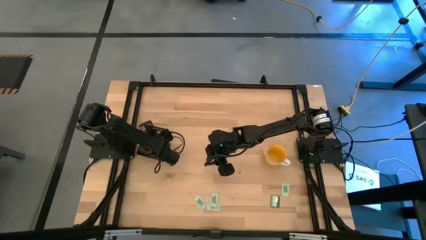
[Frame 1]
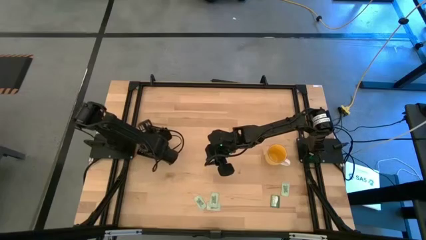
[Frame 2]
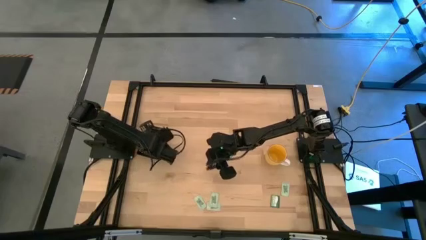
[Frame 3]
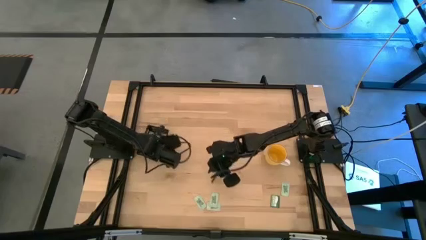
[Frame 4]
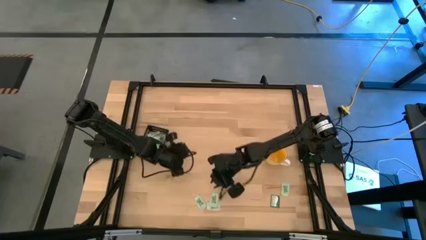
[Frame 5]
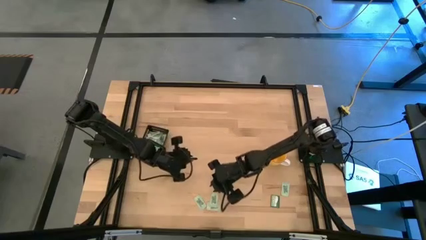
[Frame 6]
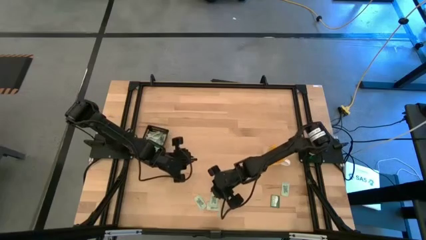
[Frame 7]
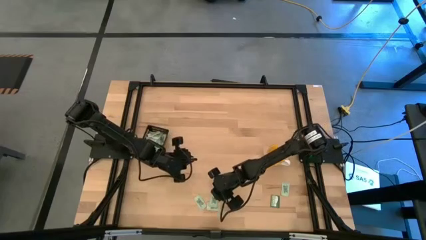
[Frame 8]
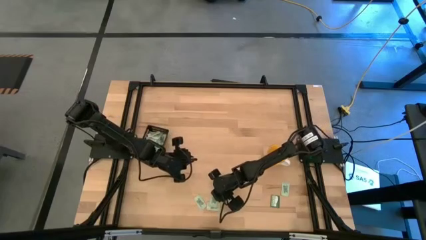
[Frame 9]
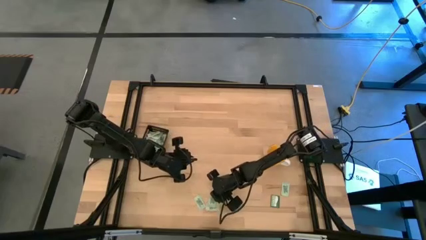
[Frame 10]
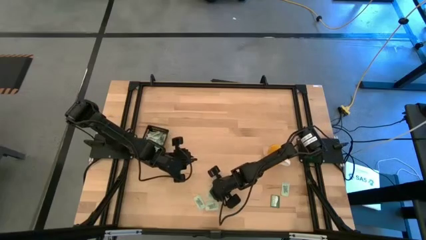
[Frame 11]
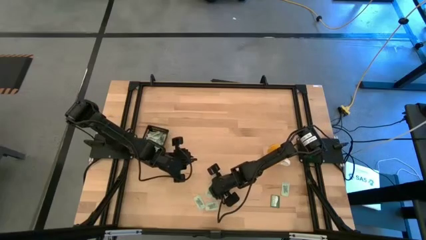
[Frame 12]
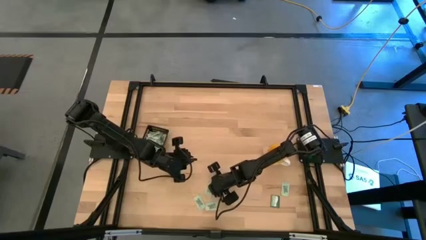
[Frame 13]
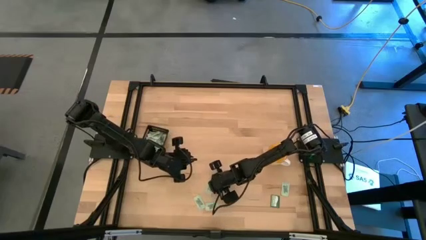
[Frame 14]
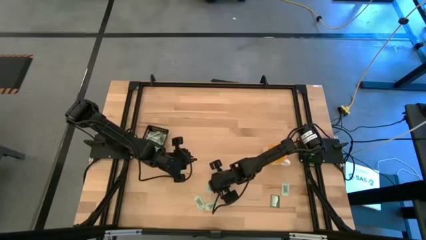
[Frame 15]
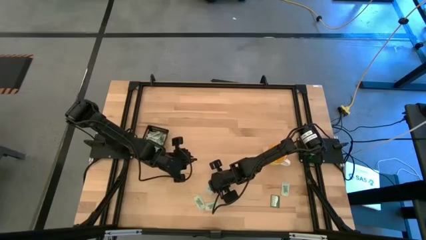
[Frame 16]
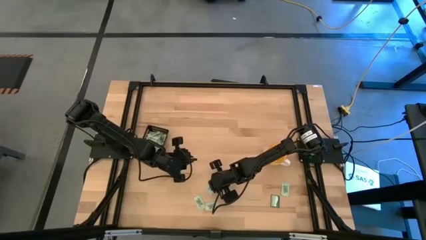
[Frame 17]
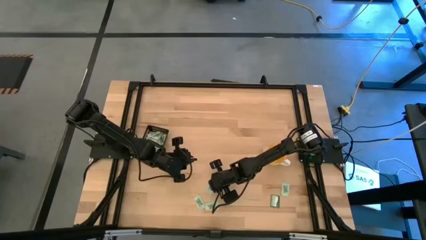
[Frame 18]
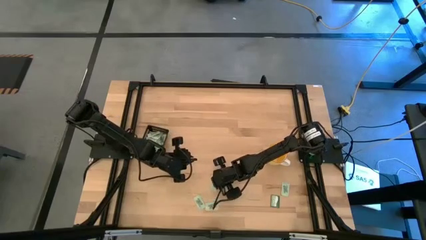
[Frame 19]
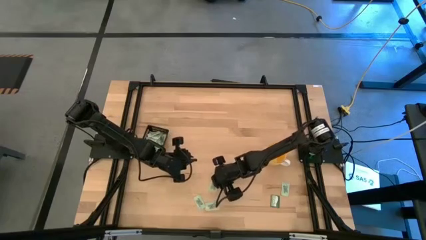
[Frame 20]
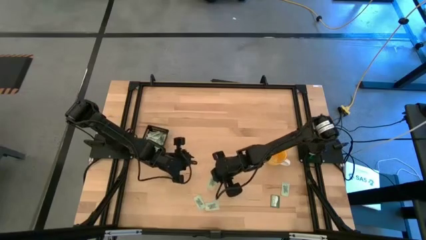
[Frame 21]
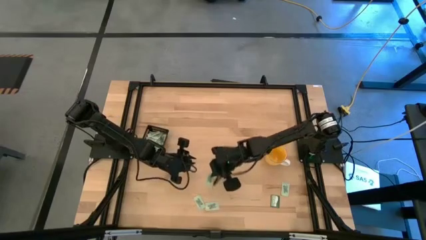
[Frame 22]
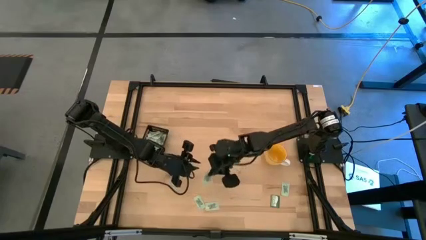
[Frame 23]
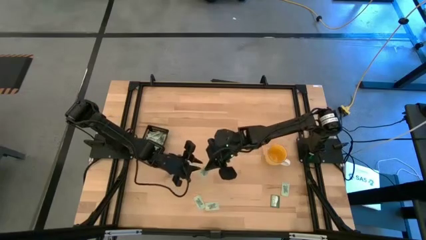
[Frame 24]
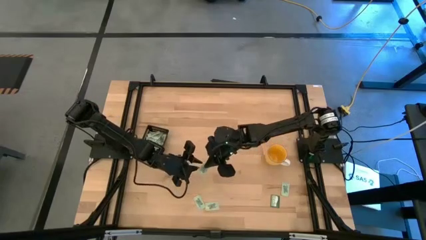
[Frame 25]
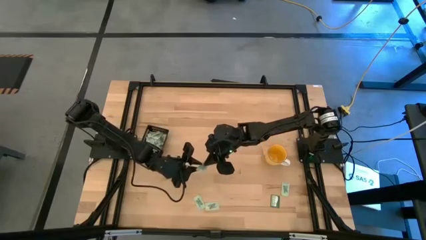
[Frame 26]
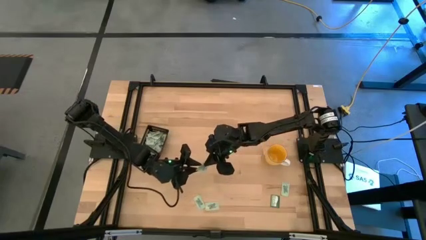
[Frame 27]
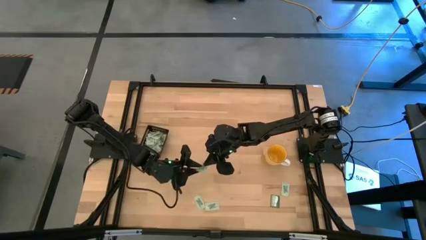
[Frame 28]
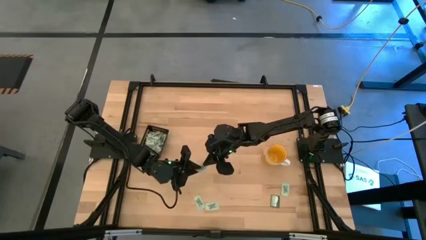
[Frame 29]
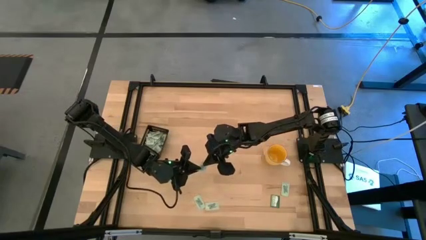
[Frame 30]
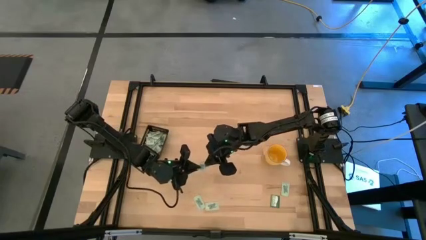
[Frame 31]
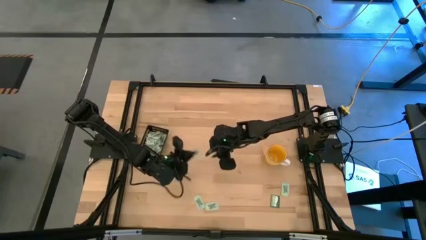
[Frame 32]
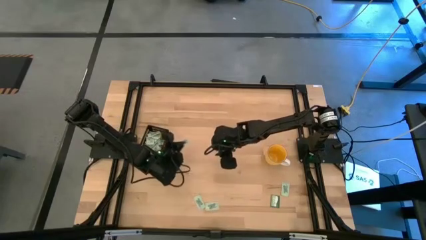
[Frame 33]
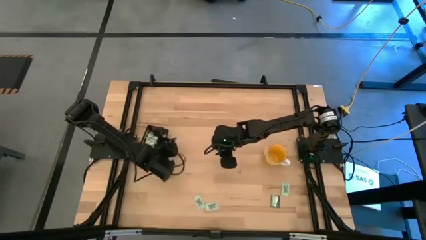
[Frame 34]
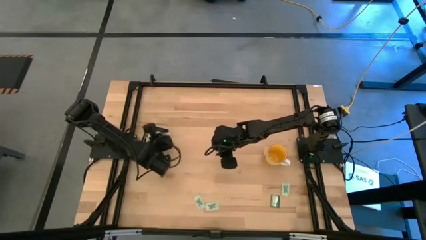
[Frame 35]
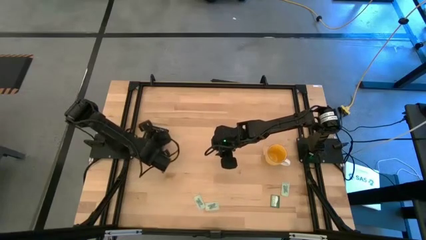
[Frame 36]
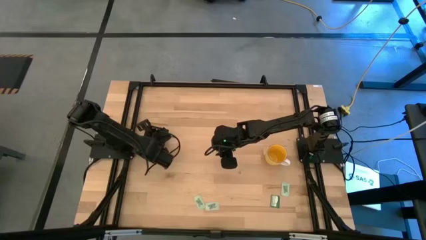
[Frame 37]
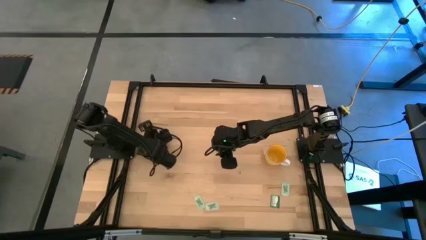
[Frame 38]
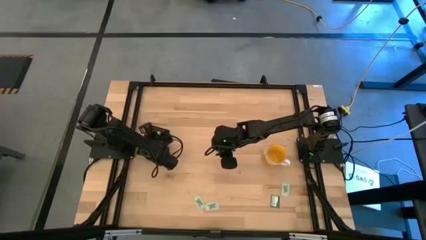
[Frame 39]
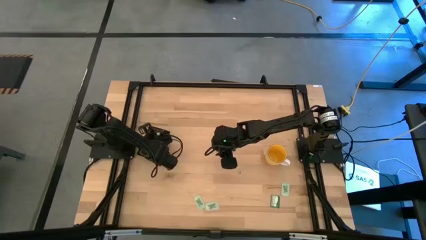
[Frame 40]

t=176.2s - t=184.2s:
Task: Pick and place Stevia / Truvia into bins
Put the stevia packet into the black bin

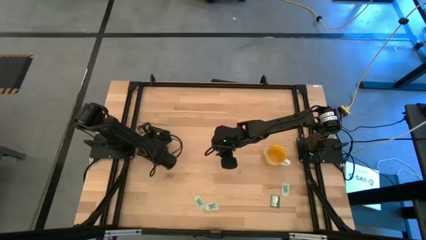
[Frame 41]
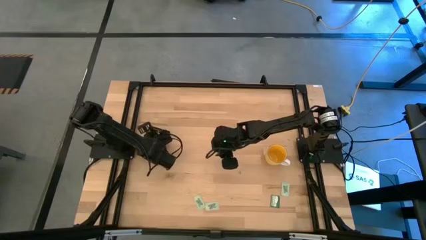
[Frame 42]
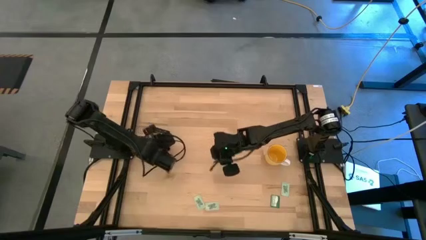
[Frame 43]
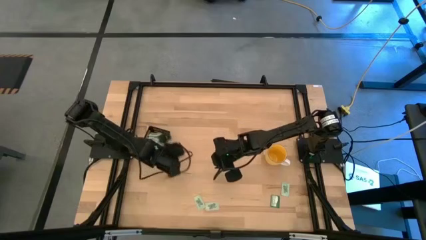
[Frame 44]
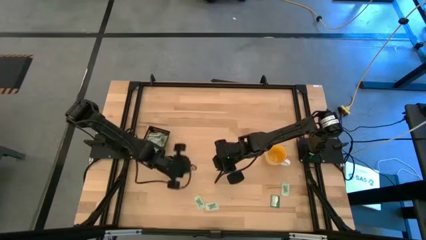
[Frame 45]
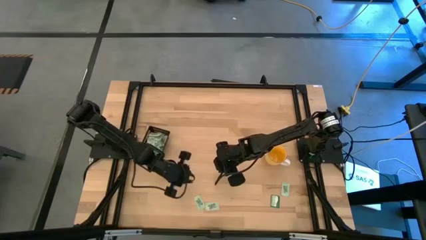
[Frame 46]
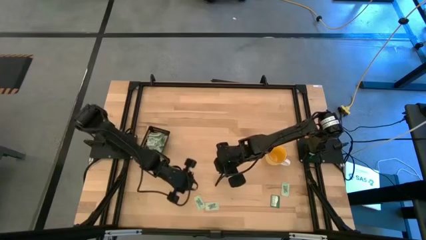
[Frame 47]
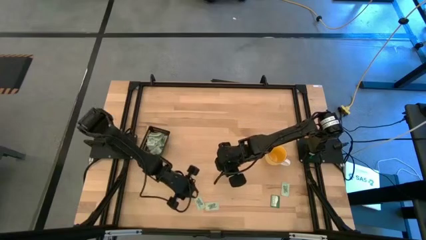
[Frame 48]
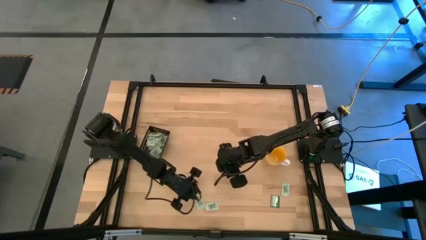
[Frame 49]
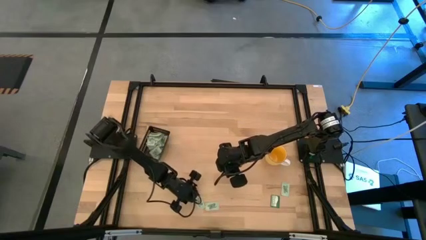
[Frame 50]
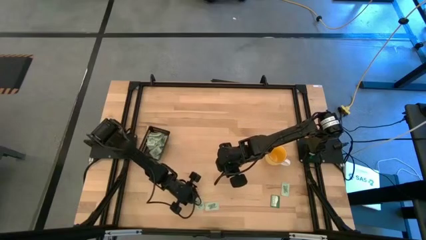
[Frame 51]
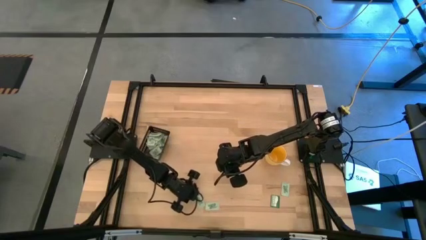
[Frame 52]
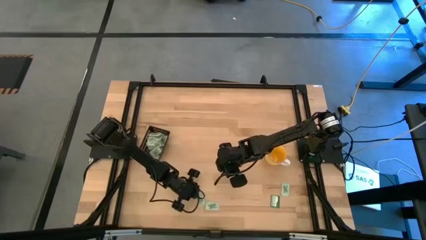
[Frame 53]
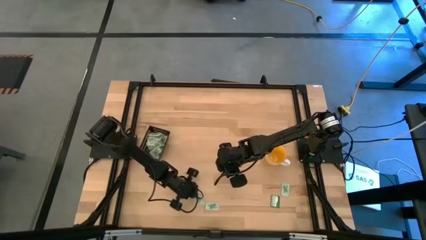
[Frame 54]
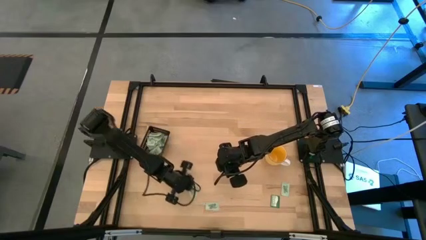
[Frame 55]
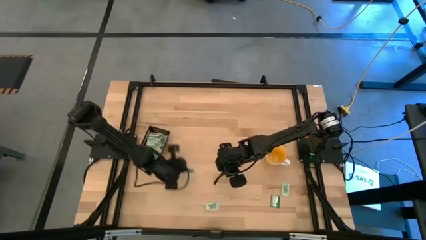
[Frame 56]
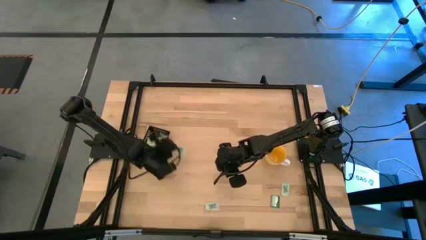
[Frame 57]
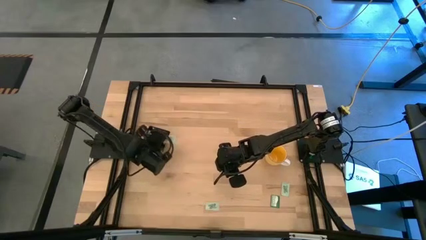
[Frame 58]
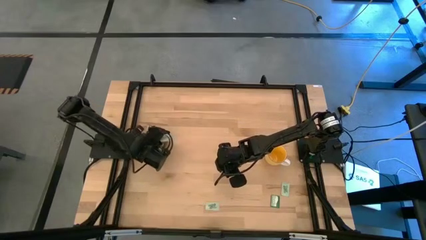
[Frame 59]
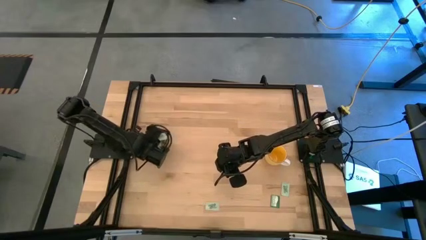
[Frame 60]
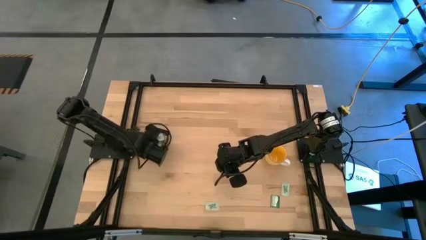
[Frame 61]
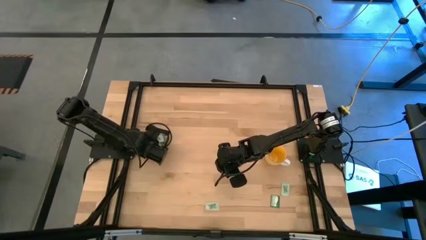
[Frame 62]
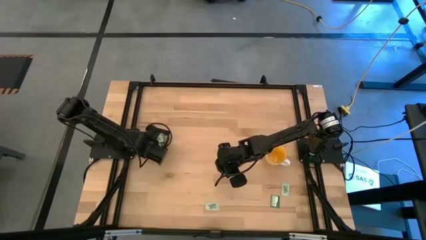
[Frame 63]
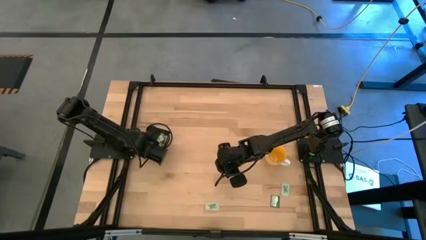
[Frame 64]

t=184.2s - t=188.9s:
Put the stevia packet into the black bin

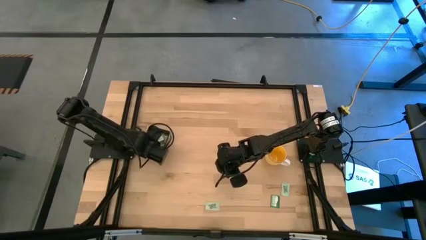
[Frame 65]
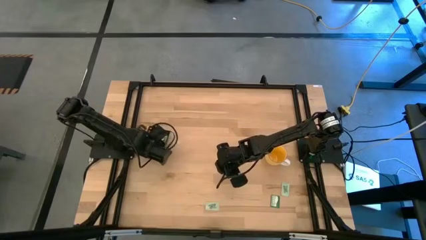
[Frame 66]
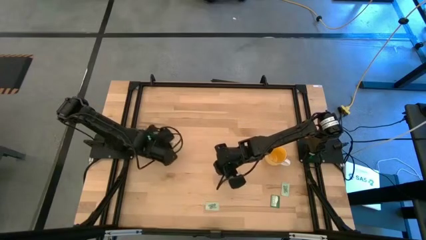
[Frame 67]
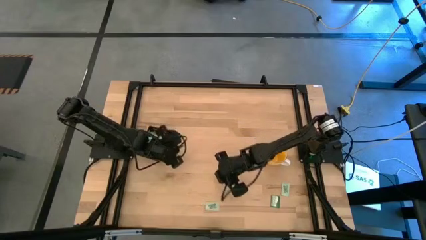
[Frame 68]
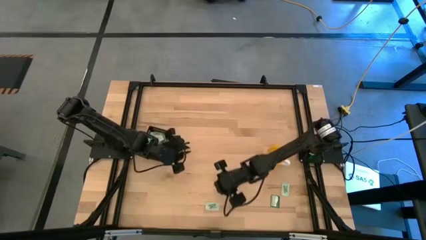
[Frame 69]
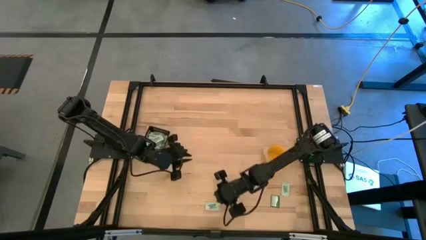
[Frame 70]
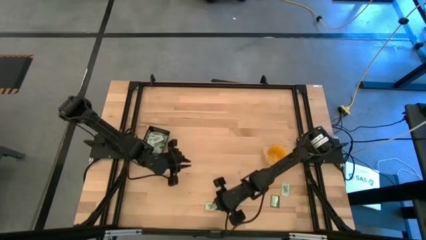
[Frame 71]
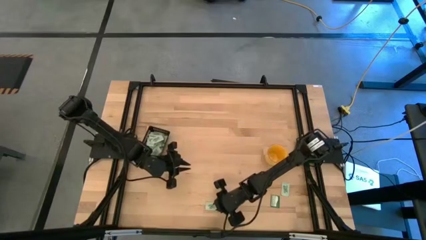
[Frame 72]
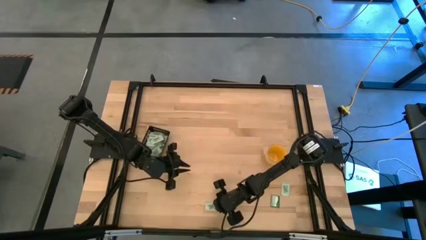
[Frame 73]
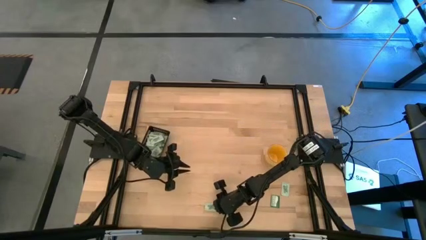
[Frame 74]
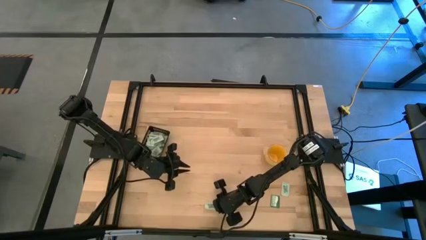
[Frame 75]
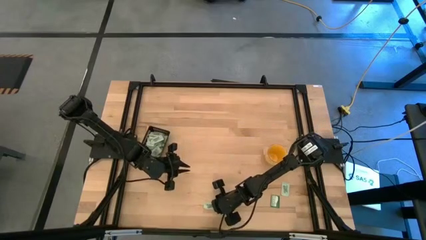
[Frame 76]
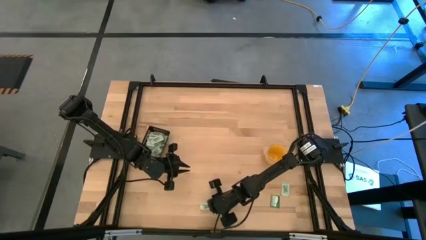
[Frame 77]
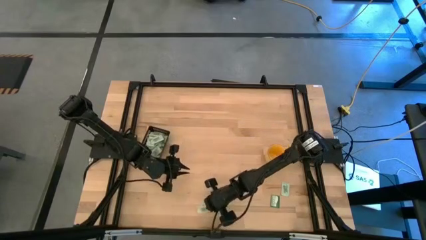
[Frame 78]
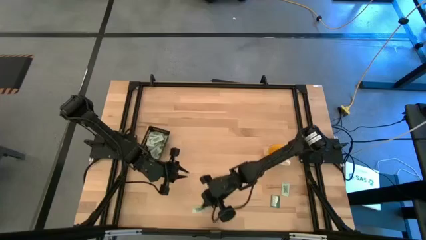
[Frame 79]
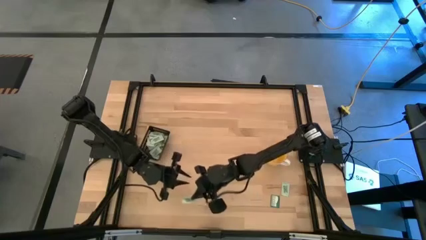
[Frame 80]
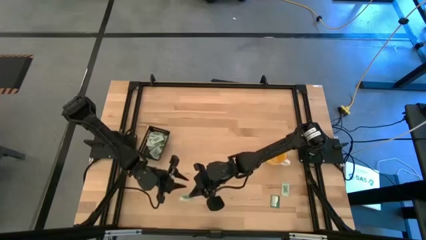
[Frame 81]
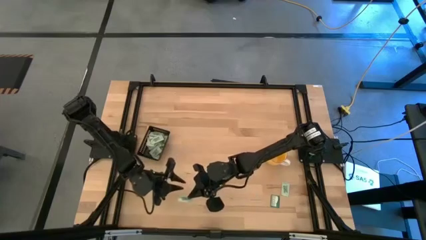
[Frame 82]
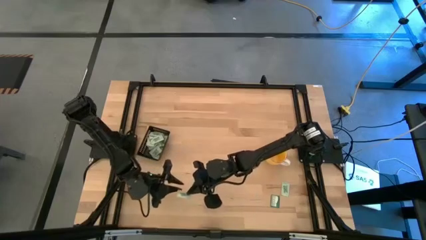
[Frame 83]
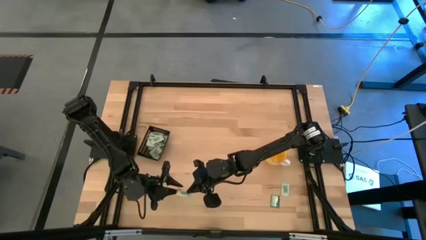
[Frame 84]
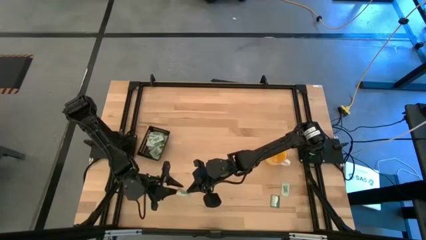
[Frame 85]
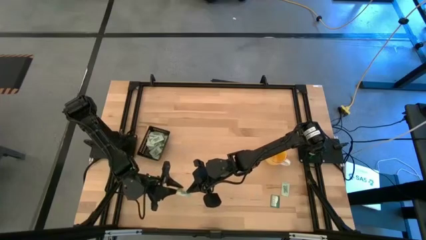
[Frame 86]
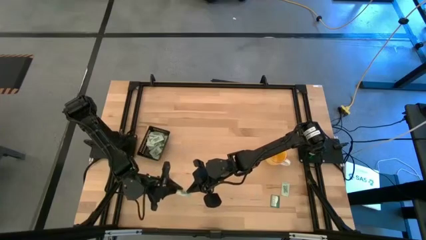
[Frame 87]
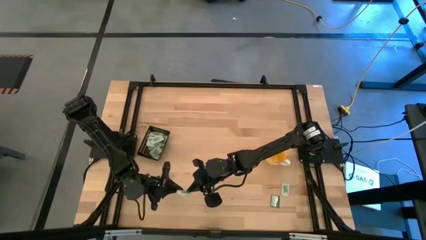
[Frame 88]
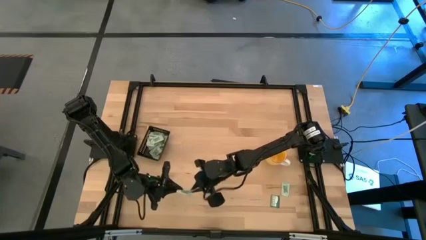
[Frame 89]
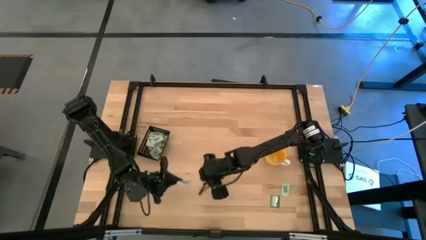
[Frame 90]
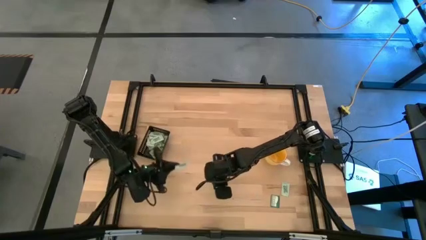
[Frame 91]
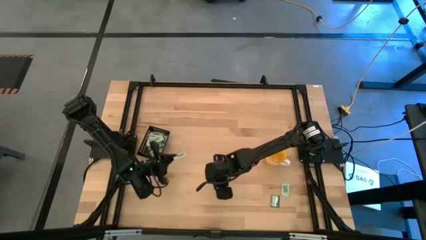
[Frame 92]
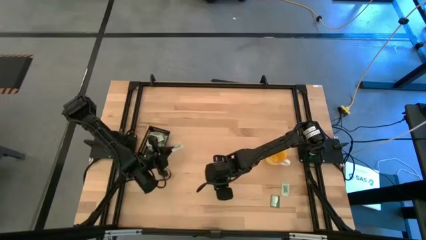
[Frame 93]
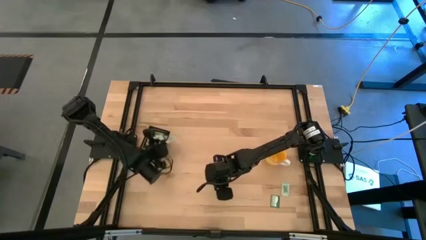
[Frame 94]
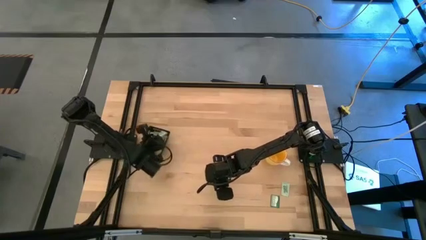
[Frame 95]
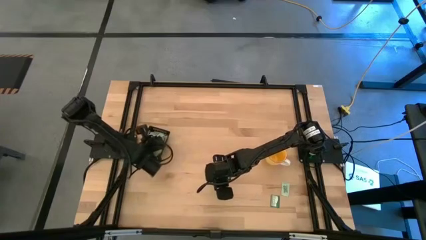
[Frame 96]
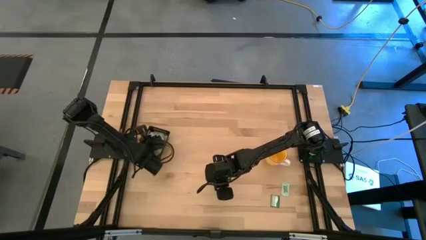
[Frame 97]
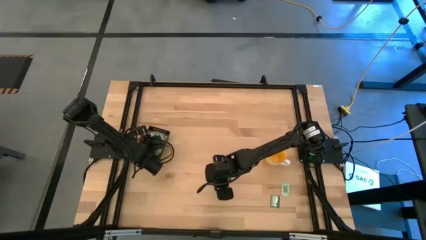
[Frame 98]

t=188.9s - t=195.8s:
Put the stevia packet into the black bin
